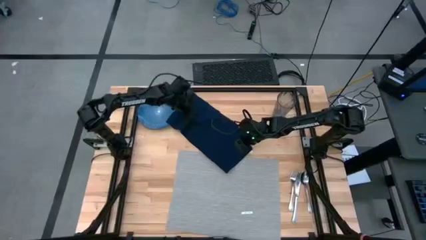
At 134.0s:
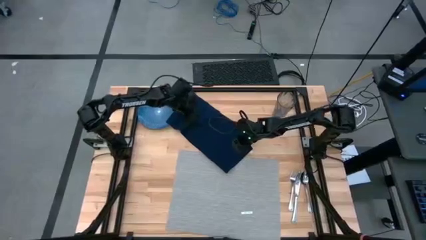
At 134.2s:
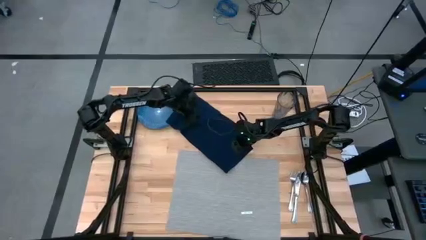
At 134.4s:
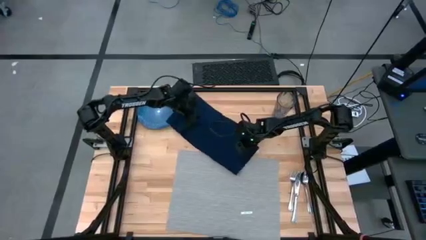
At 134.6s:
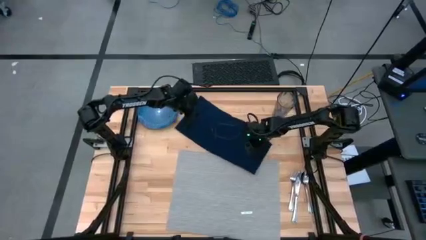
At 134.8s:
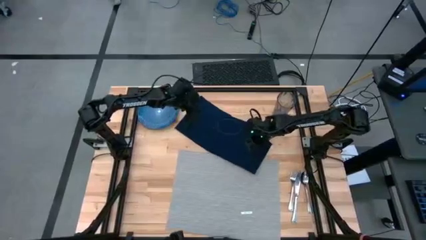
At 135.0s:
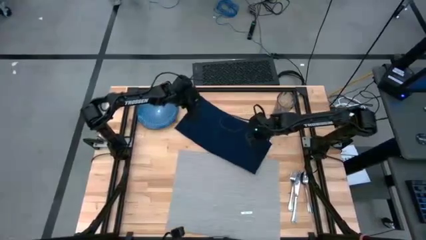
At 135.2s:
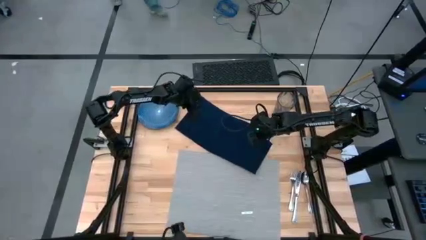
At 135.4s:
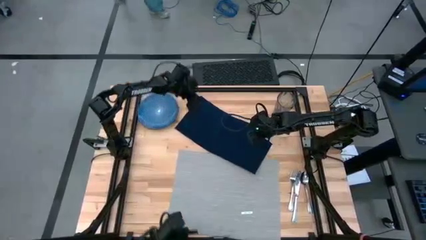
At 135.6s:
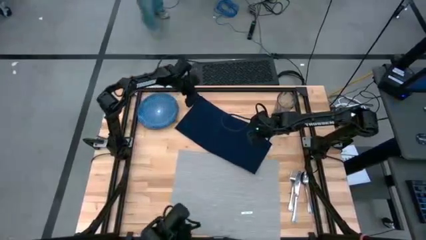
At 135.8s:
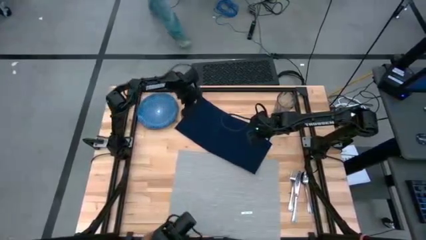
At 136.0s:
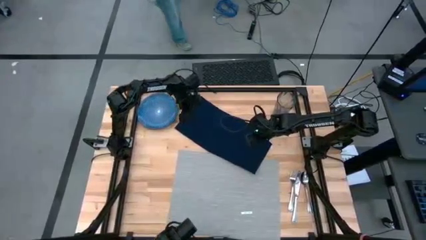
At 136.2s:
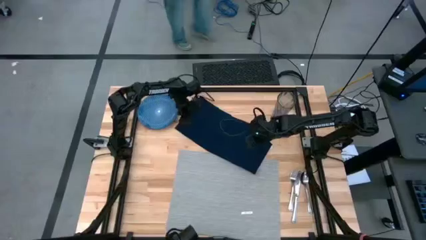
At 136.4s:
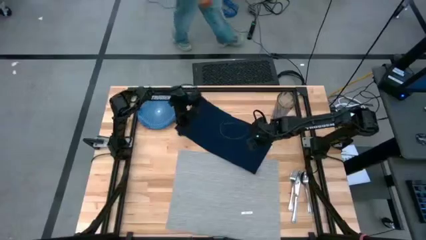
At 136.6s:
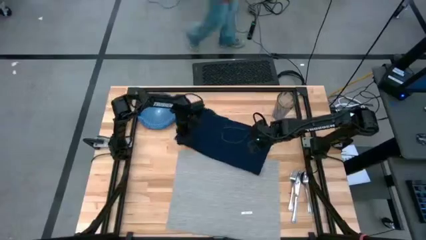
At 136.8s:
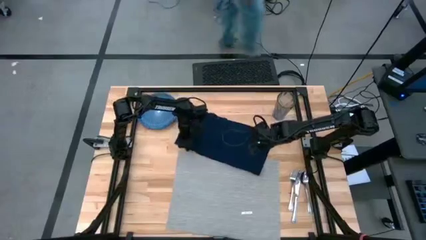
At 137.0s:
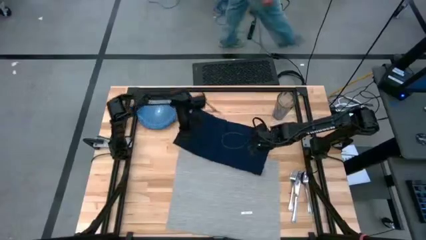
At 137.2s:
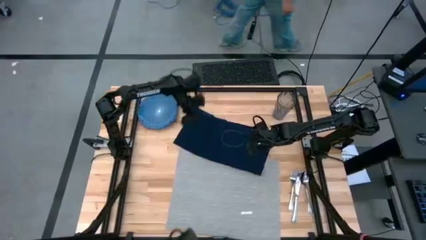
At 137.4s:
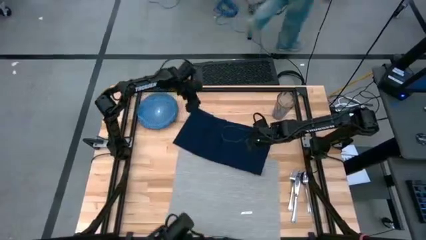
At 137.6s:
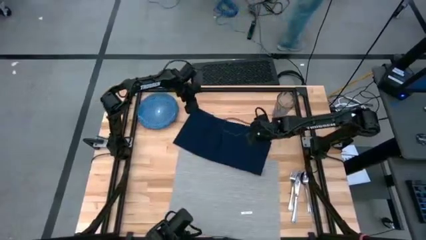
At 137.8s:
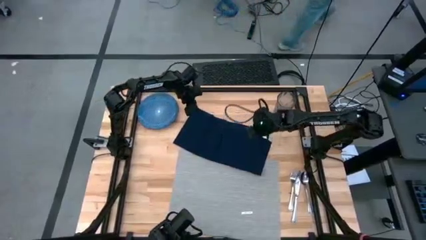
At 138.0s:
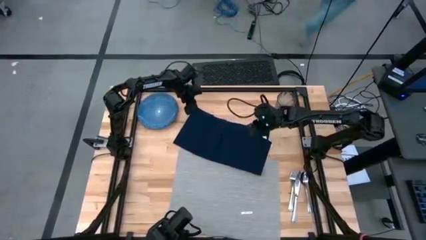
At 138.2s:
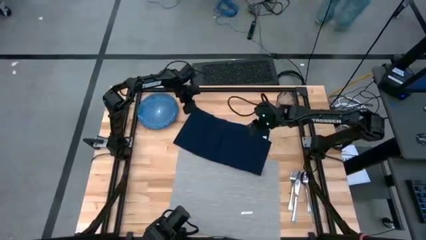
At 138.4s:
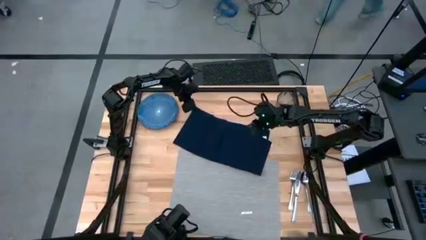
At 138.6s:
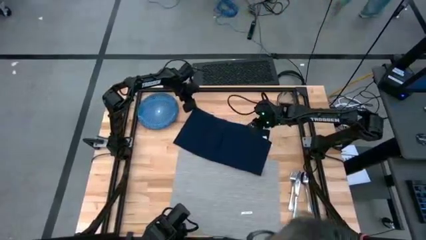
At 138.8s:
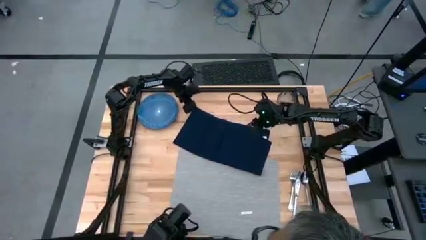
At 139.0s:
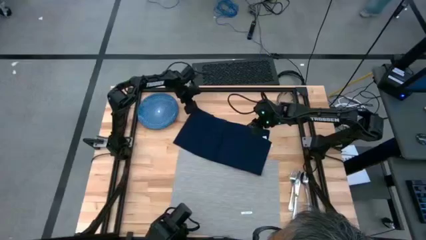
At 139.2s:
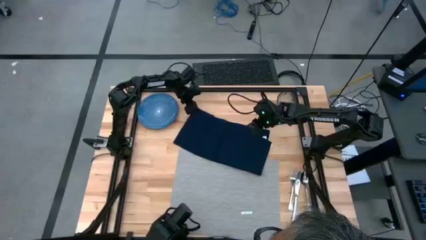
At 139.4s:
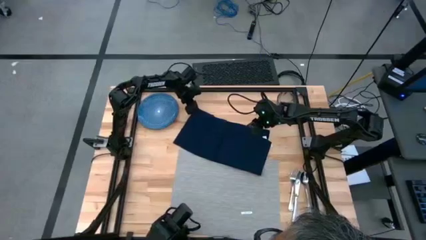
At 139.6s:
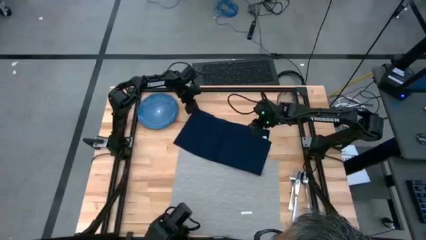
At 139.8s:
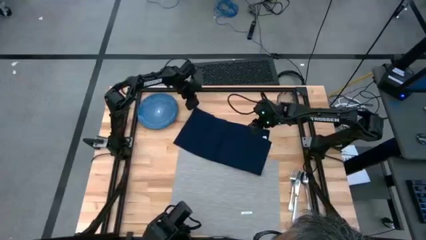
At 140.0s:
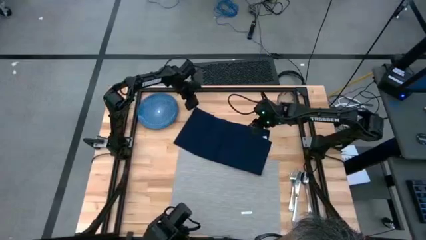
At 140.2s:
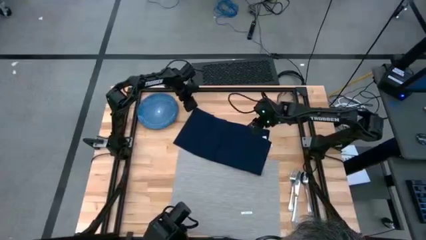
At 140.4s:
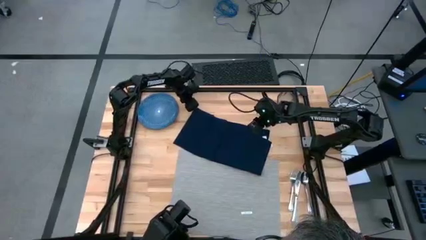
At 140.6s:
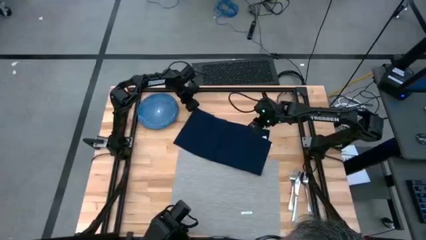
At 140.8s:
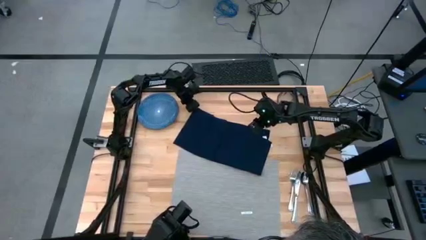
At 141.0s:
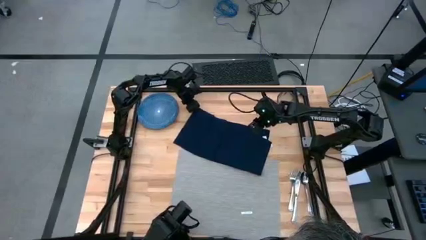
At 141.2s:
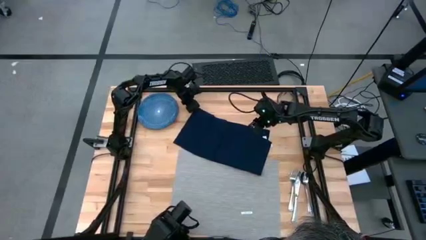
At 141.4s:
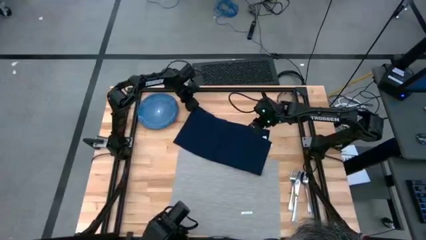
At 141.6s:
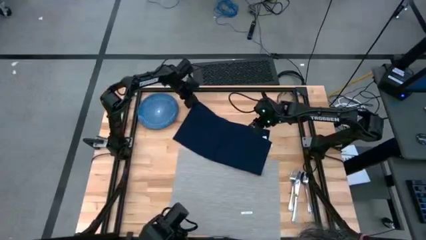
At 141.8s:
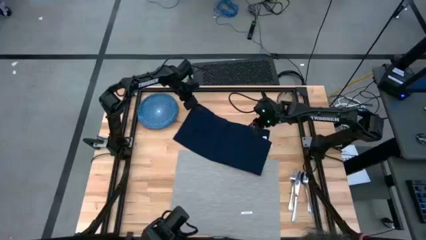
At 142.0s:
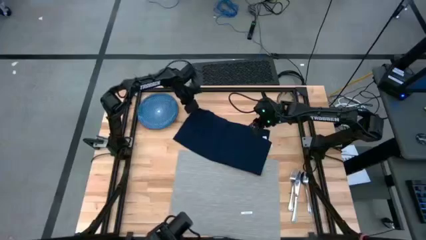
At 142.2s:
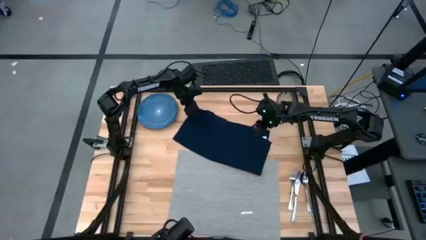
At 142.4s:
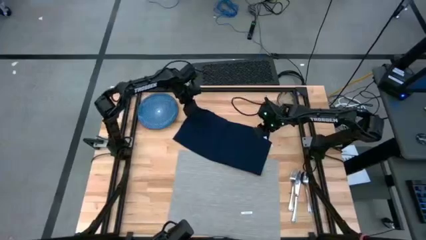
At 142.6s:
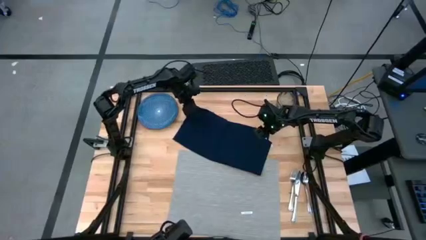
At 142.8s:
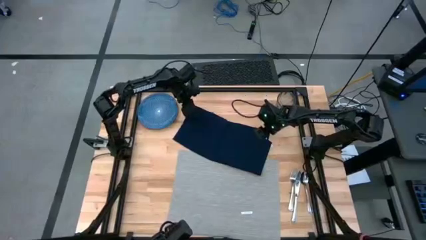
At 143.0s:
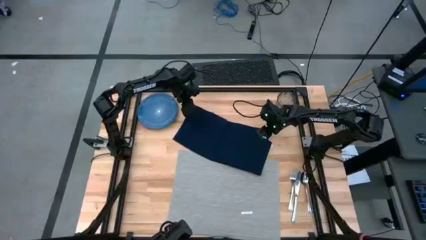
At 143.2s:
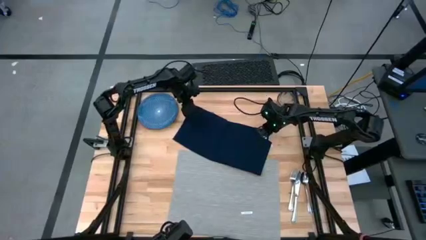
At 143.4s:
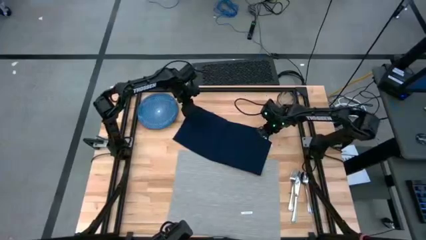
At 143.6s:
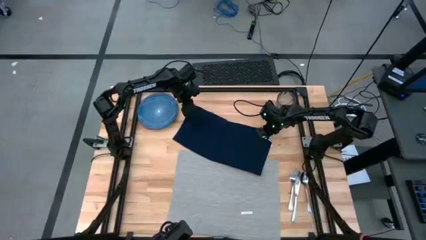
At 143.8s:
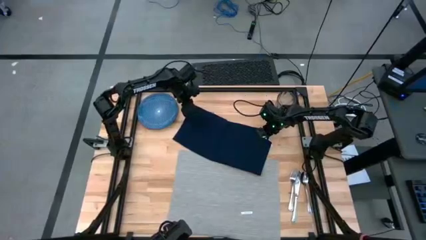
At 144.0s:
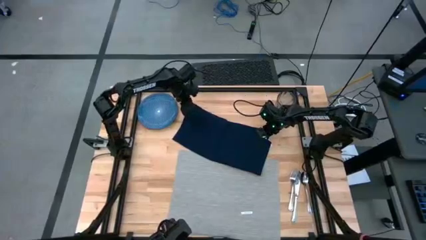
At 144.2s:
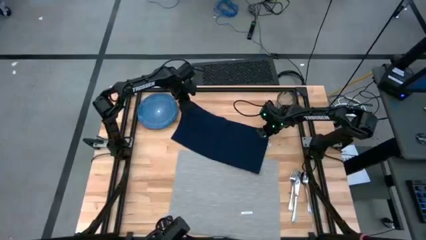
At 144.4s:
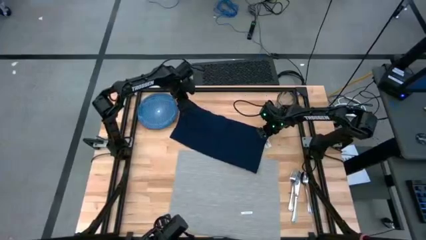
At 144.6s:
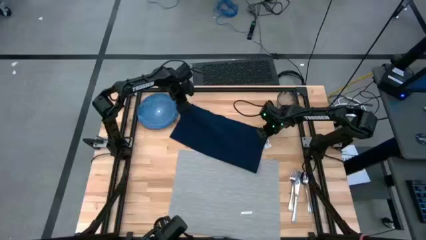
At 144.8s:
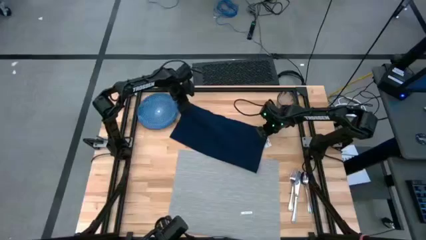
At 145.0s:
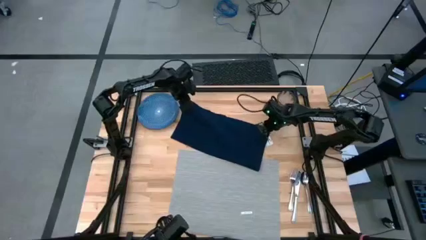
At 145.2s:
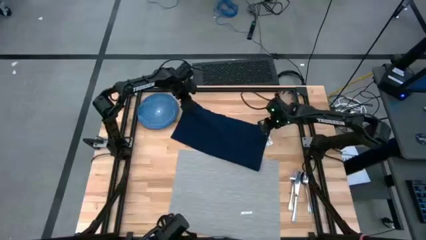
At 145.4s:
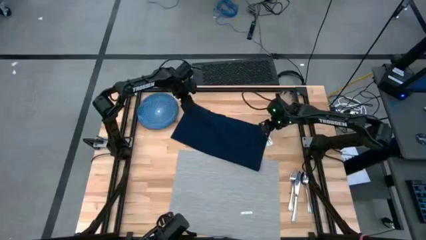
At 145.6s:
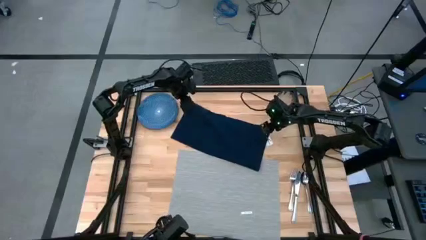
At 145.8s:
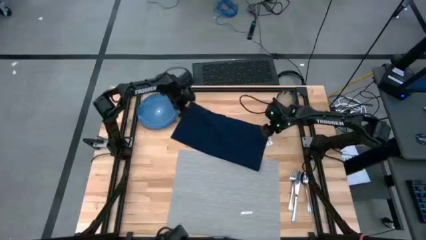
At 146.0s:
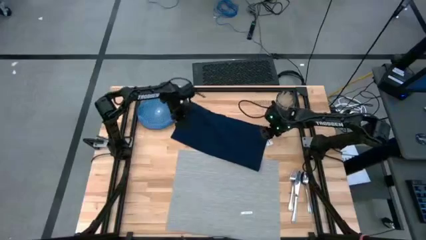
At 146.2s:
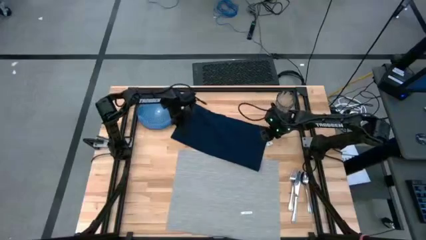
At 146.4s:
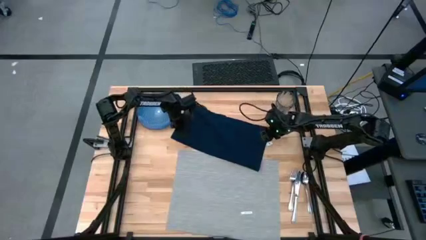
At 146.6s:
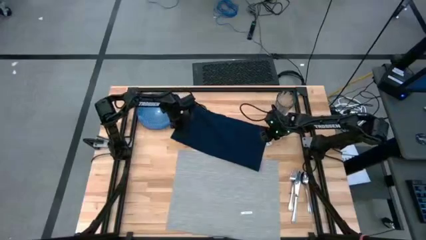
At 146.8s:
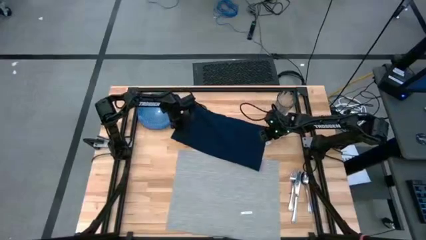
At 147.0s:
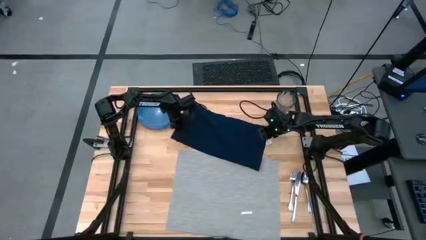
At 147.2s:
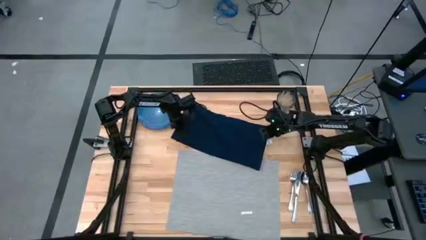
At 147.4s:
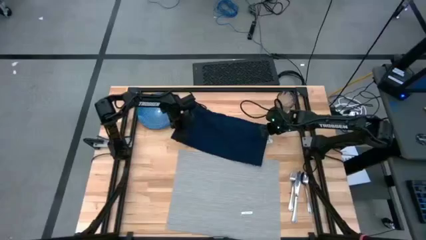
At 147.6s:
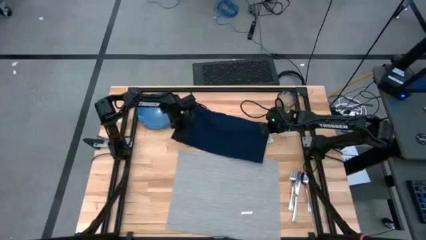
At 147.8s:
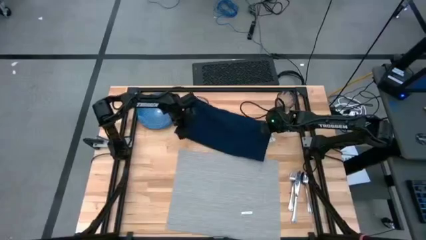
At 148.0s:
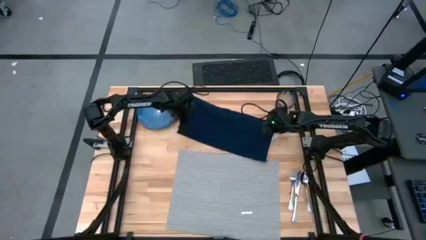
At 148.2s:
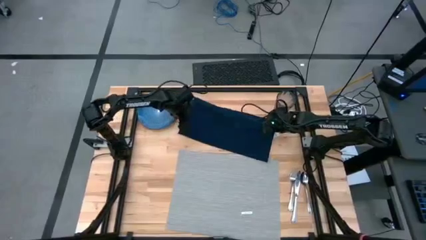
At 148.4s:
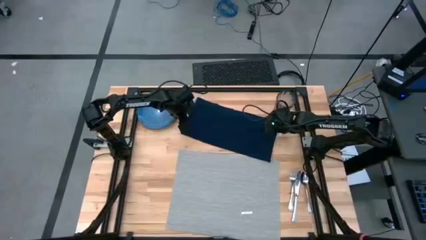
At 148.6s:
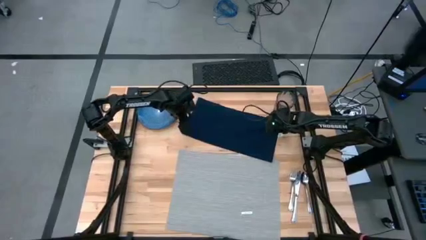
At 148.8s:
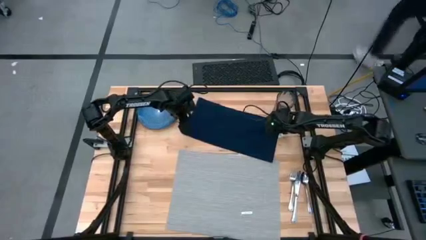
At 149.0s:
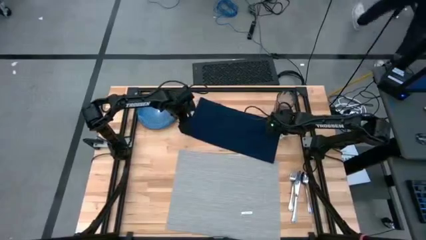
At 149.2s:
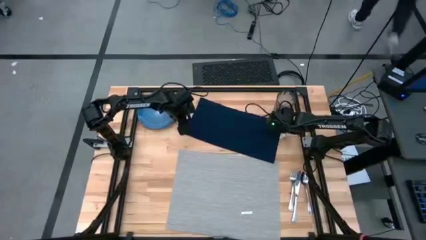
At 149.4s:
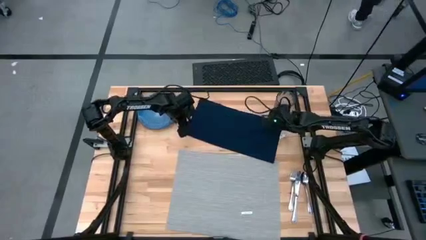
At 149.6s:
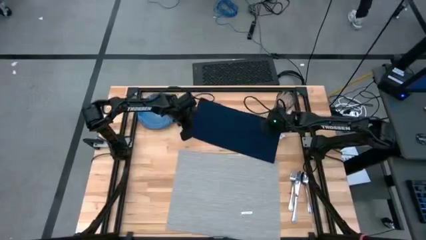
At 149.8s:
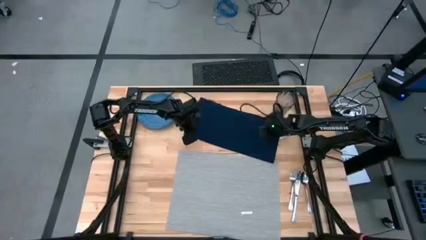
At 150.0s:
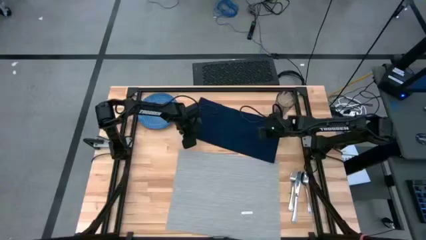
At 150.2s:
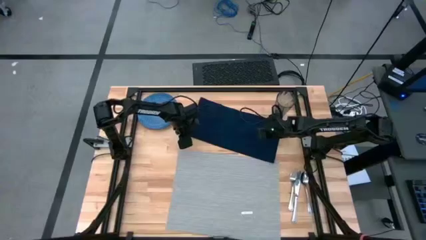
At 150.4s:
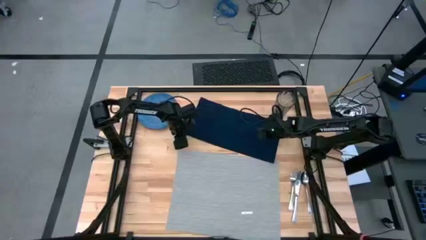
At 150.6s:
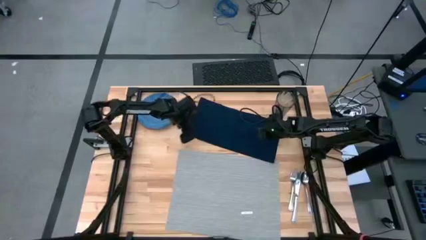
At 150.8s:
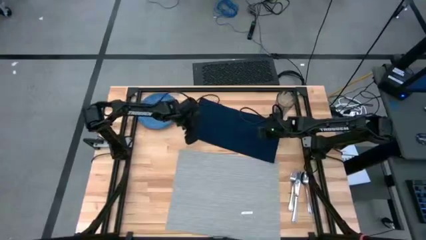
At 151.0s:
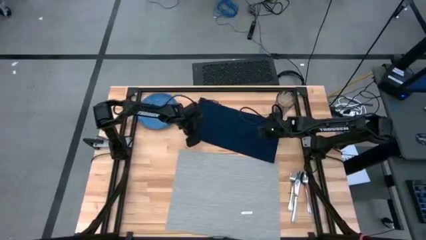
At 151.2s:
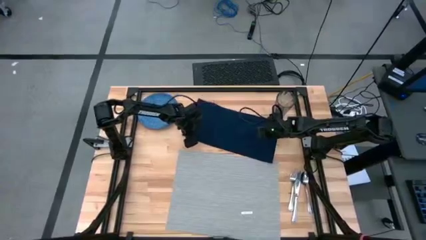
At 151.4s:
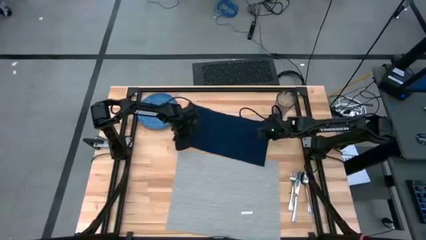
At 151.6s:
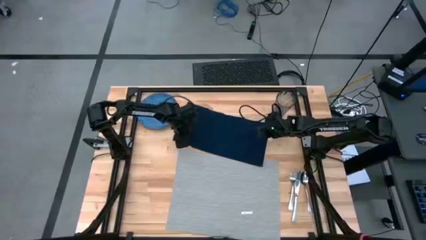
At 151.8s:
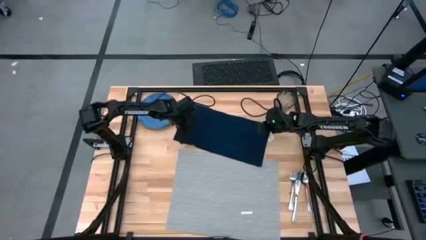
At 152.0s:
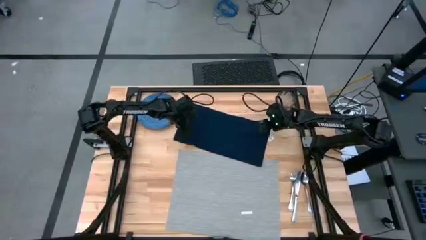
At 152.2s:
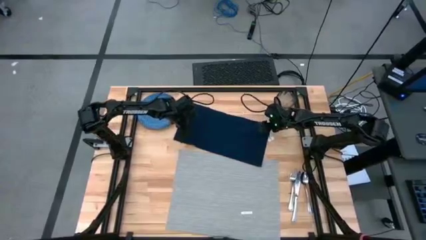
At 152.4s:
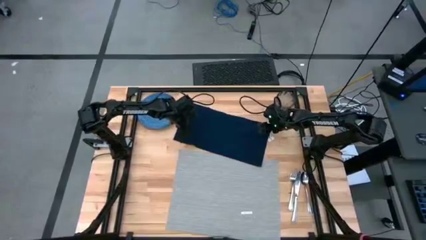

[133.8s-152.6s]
Task: Set table place
Fold the dark blue napkin
